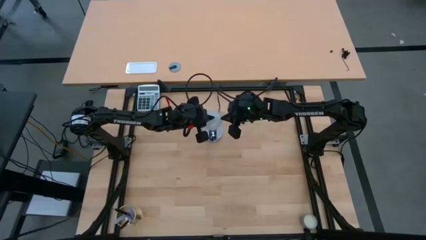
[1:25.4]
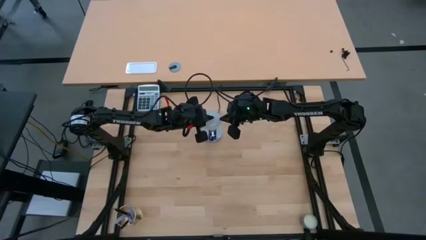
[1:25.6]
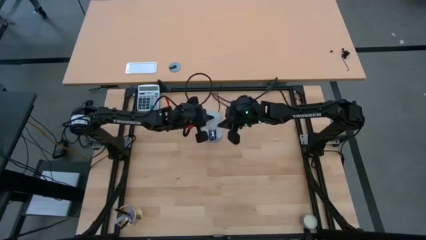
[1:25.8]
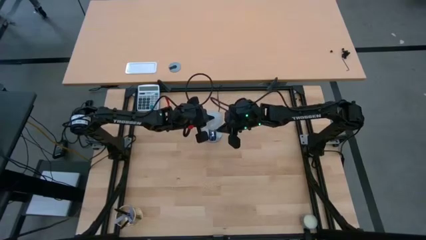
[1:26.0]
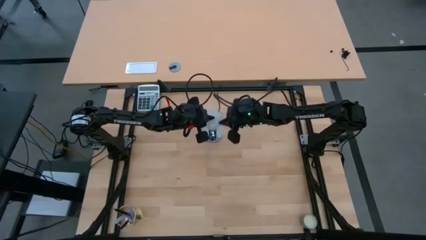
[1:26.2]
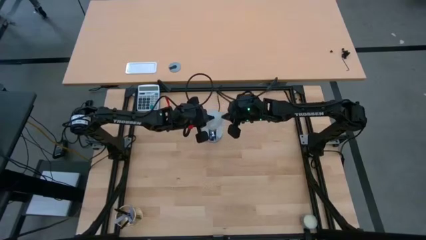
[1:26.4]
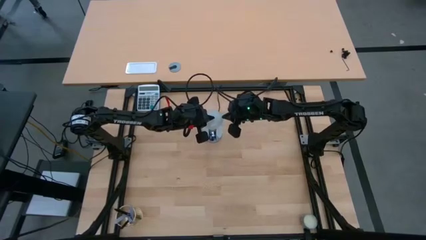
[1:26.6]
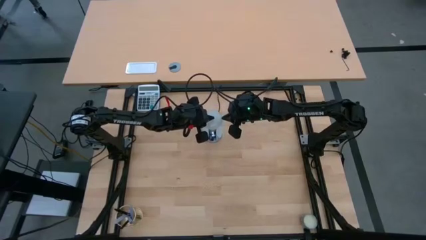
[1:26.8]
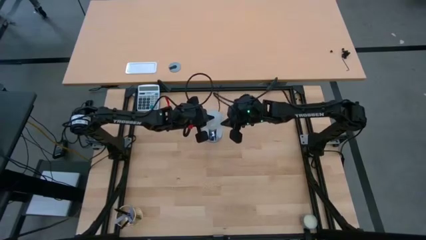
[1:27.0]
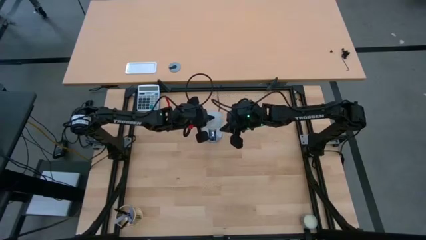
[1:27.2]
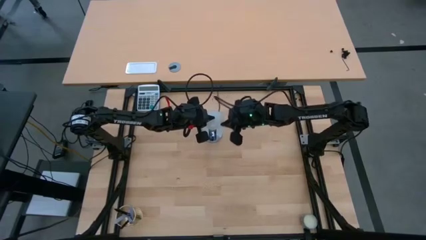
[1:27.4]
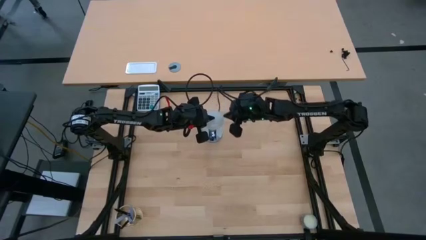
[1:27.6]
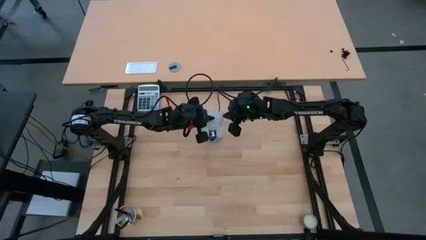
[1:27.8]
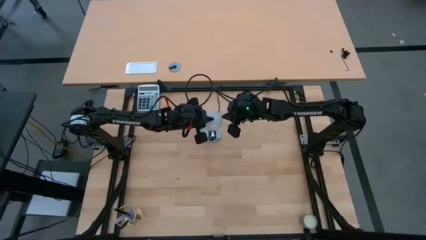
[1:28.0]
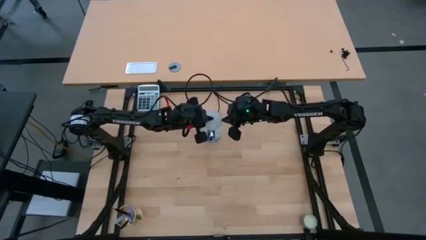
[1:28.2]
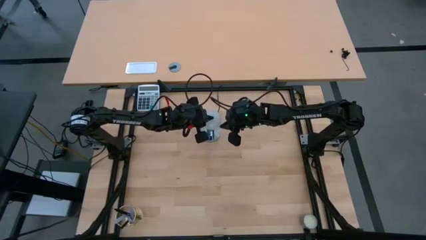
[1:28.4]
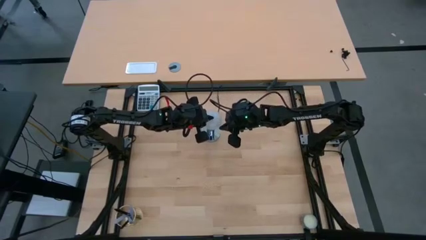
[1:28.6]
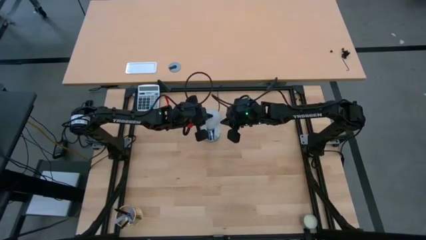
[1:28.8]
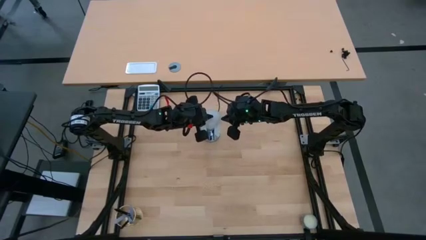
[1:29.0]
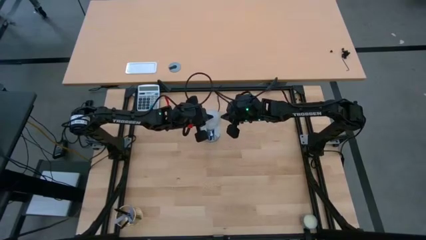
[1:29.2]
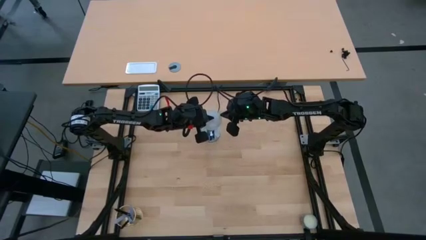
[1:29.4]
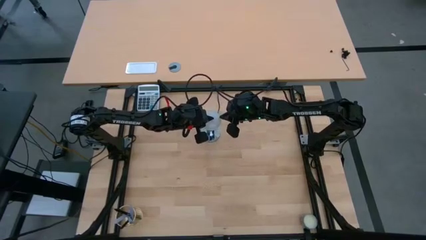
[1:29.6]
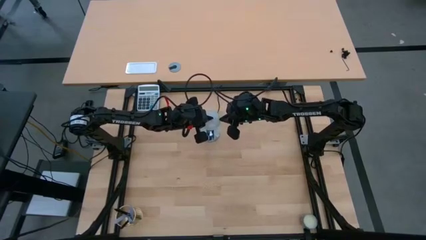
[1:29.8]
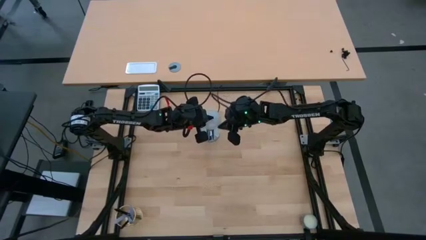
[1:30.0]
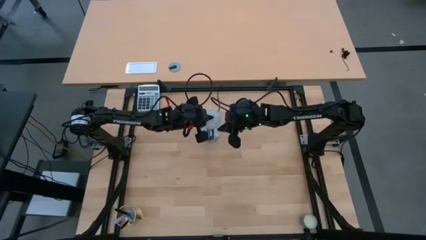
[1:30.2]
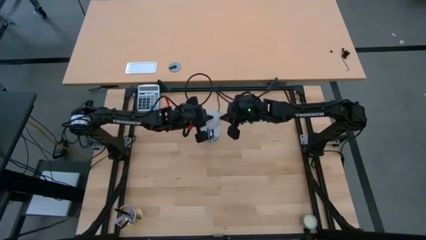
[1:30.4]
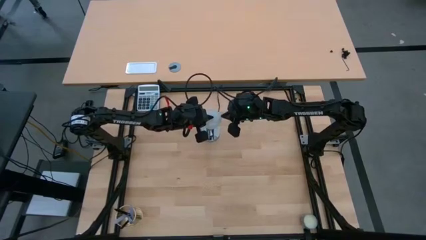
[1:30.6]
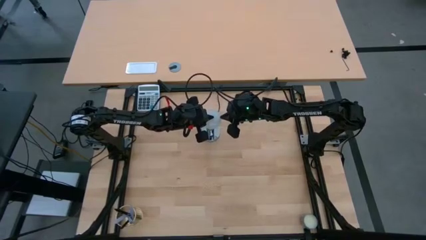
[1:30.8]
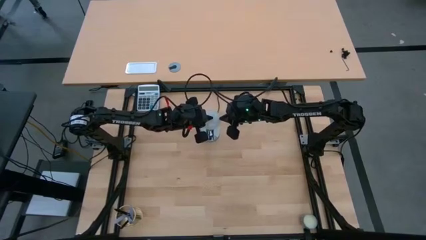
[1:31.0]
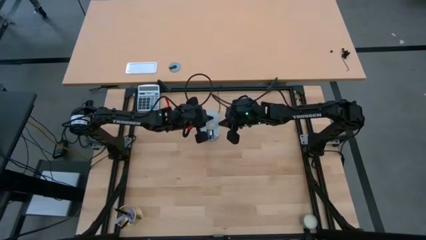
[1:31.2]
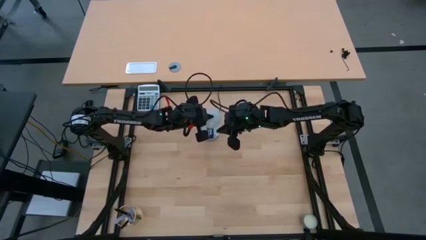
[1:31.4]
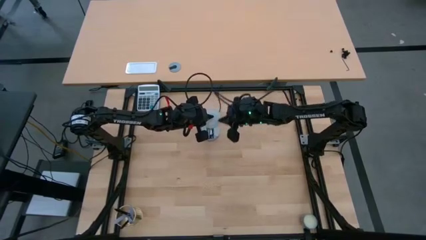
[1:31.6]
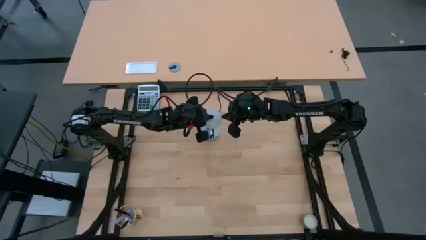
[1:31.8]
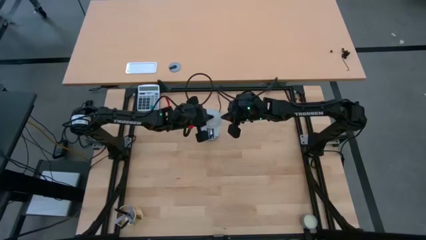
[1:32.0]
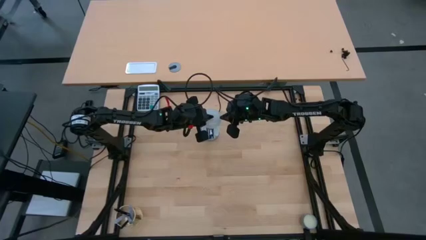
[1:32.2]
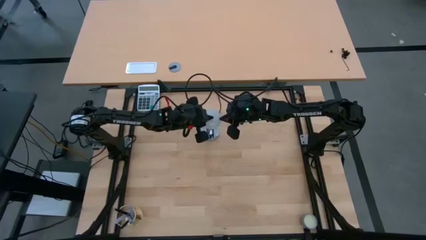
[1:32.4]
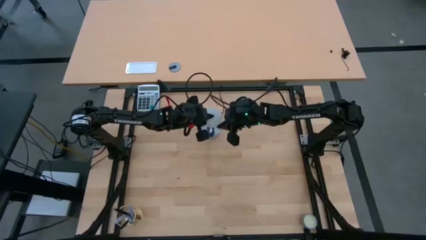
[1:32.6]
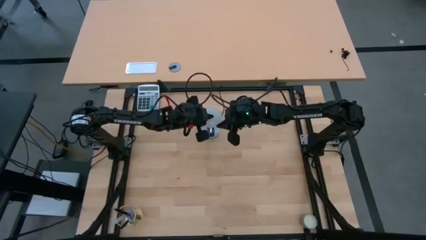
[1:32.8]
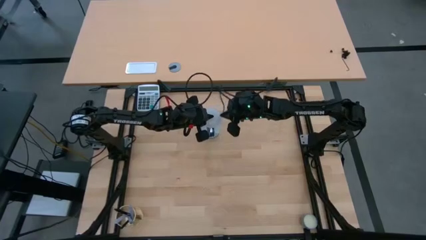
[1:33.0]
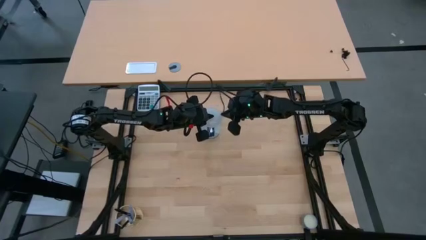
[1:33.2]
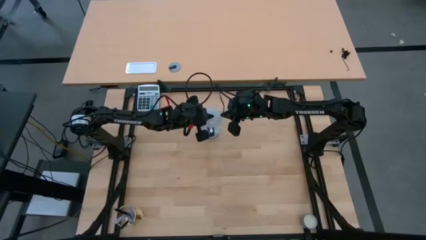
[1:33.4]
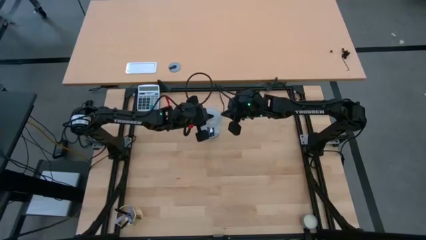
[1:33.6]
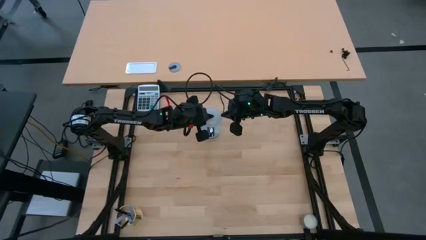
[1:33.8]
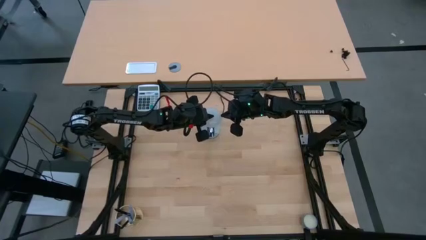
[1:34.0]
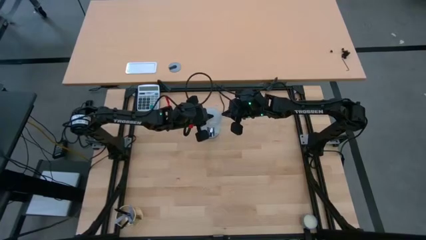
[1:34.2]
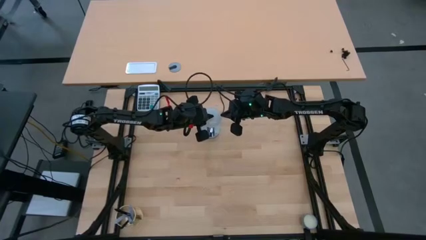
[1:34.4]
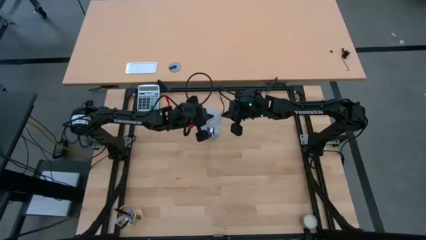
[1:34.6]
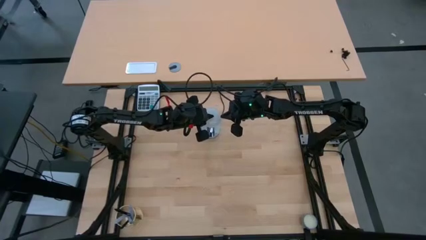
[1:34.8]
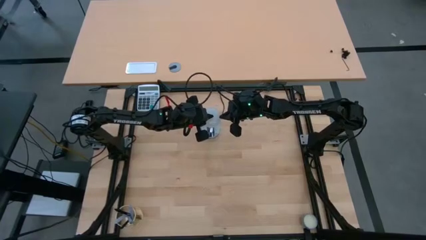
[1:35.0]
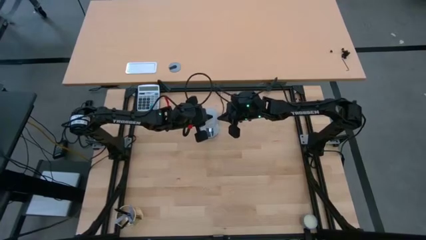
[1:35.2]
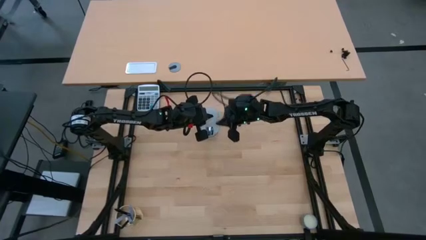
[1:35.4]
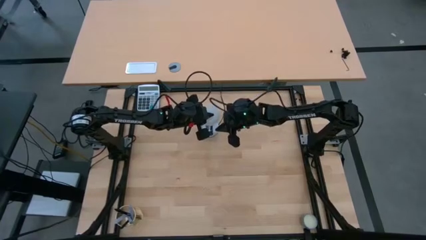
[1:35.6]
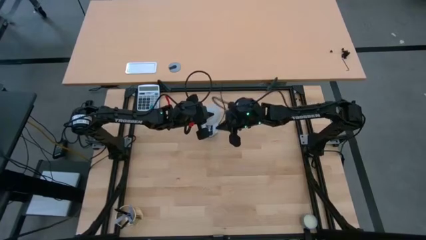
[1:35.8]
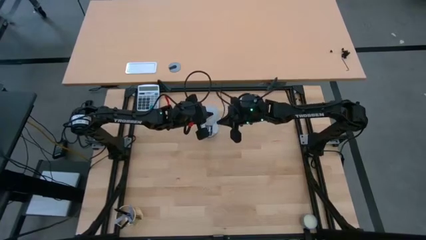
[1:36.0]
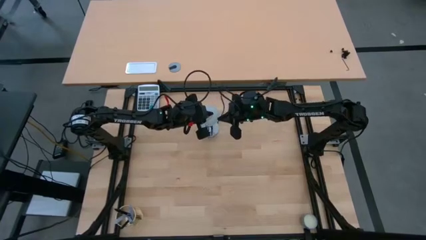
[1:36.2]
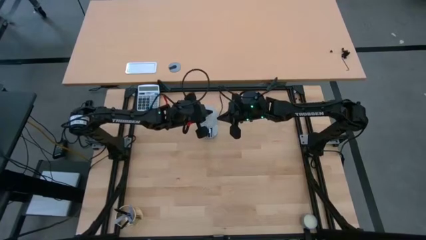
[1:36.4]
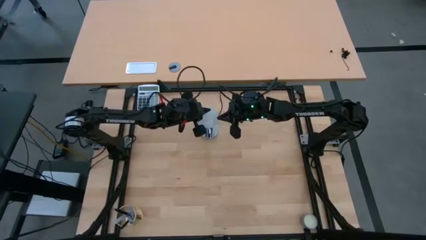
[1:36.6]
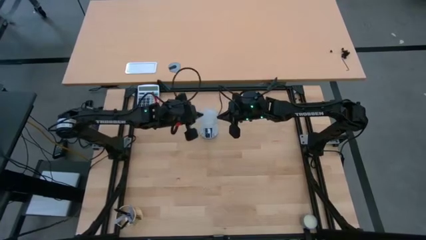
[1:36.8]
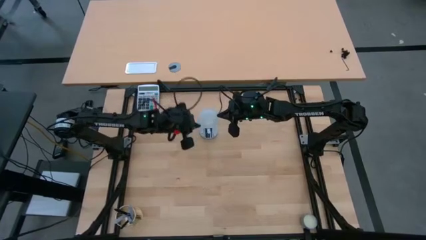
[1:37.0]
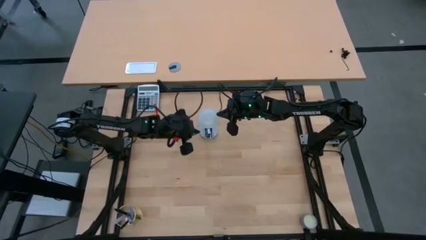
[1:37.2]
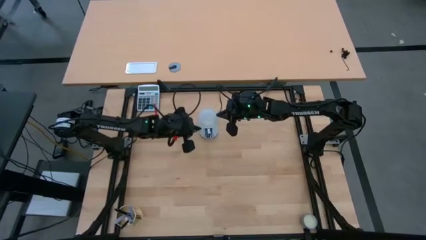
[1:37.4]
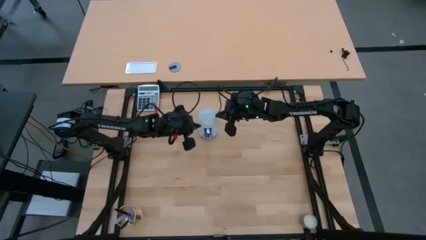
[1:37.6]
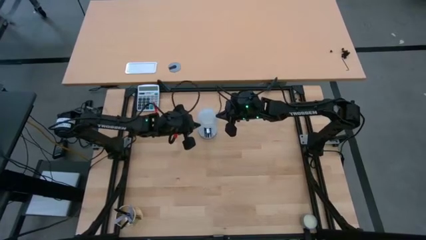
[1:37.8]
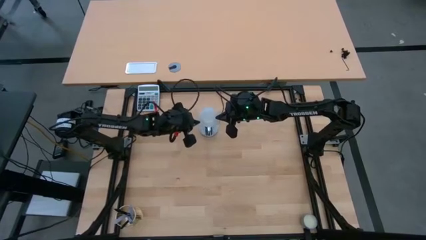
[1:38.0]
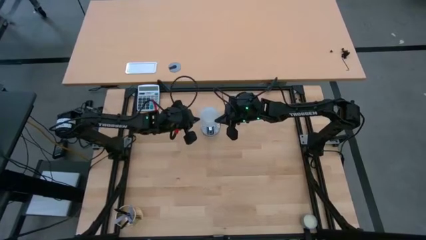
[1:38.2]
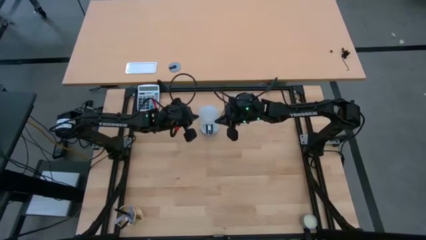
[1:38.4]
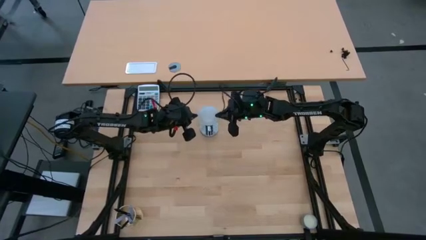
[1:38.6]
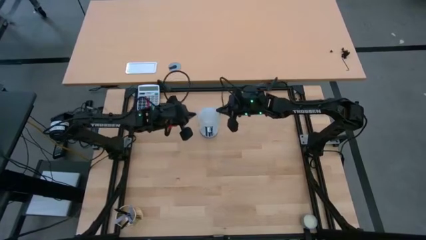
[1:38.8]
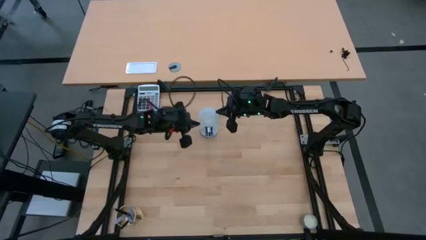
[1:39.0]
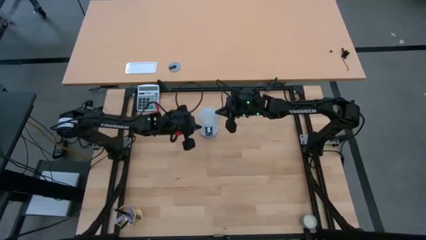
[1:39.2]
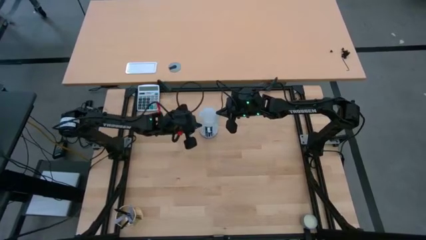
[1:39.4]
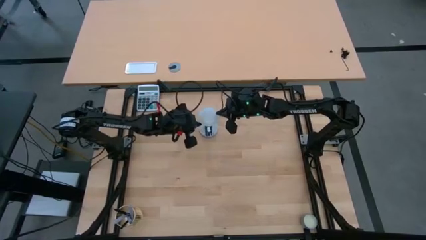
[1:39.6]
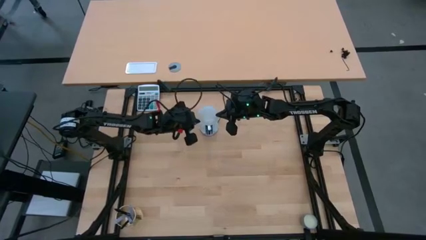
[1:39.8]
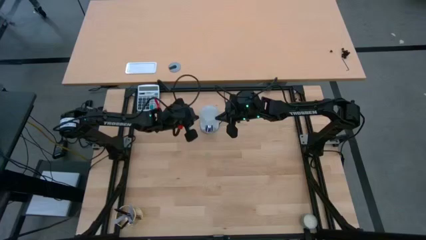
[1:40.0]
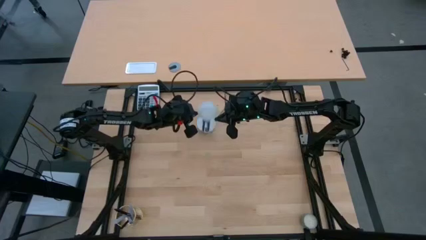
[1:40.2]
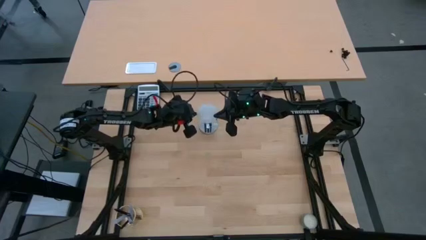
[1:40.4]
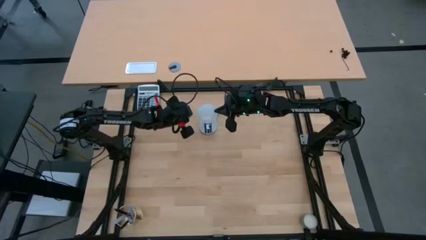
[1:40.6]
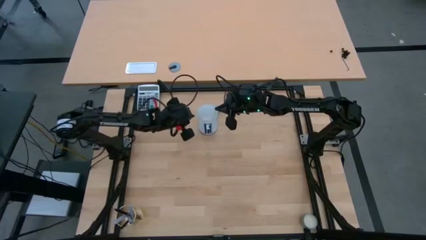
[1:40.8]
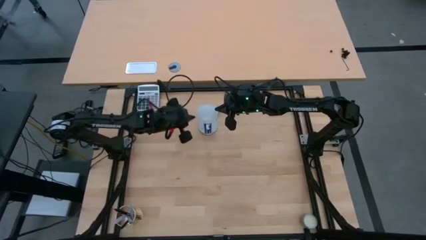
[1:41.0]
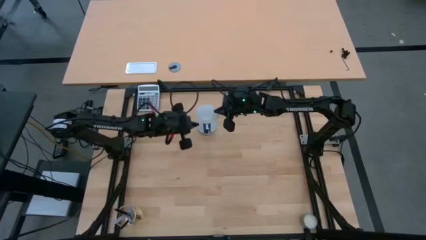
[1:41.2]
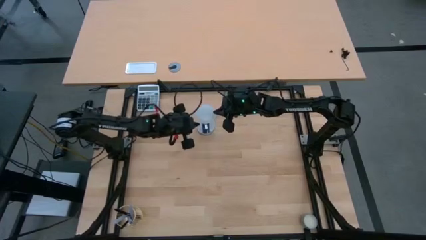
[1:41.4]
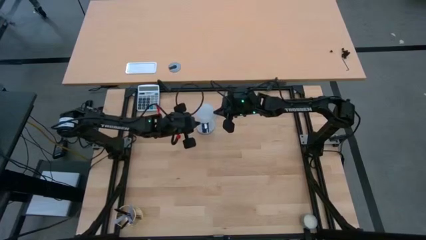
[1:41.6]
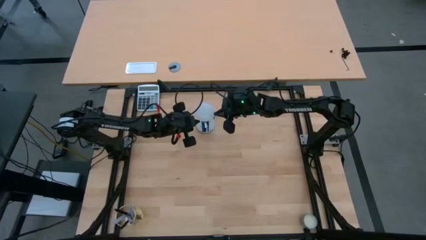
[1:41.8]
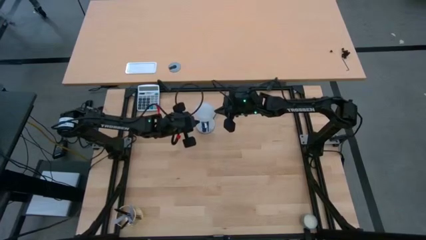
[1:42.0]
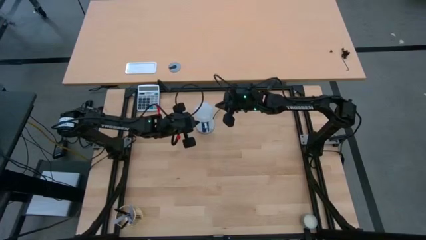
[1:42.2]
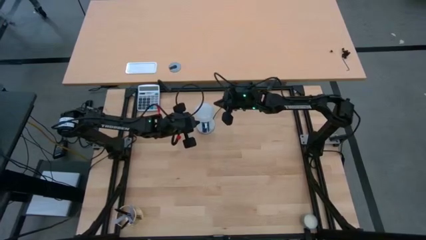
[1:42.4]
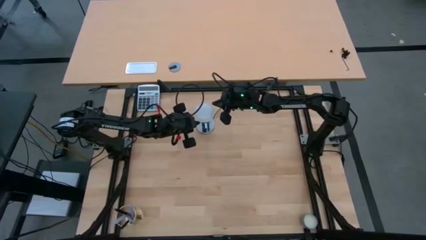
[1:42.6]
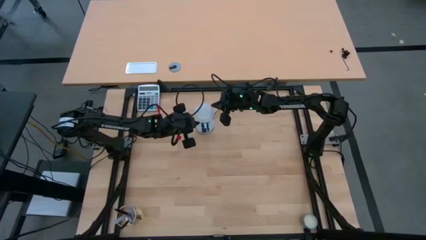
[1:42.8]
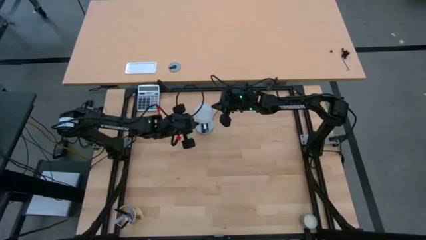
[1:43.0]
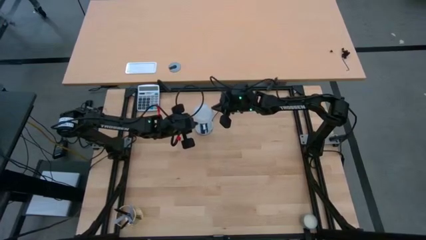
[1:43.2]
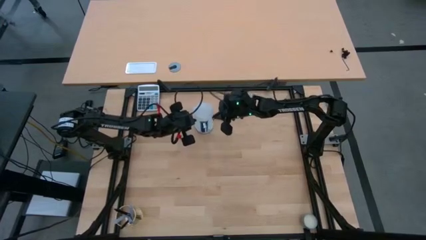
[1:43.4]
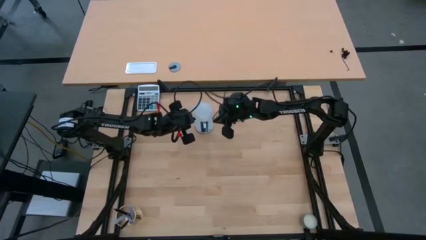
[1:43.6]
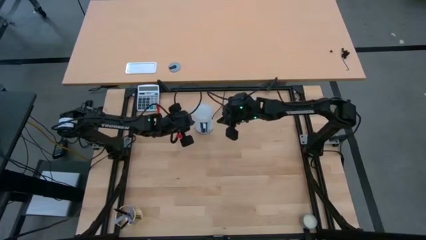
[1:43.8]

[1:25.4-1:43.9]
Task: Screw lightbulb
Insert the lightbulb into the lamp
